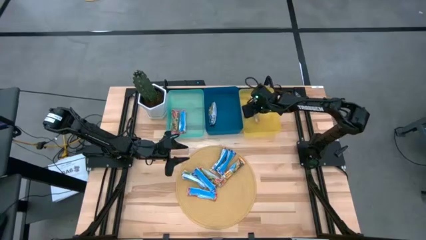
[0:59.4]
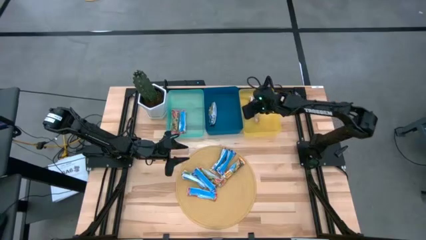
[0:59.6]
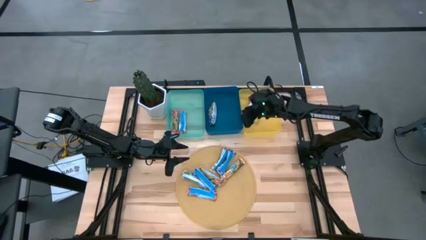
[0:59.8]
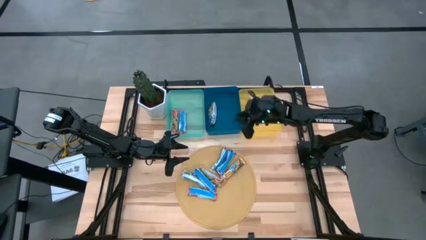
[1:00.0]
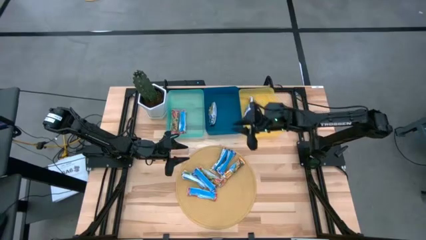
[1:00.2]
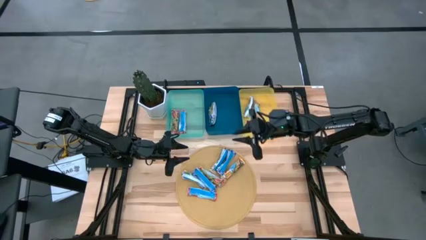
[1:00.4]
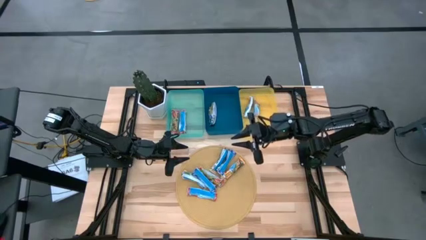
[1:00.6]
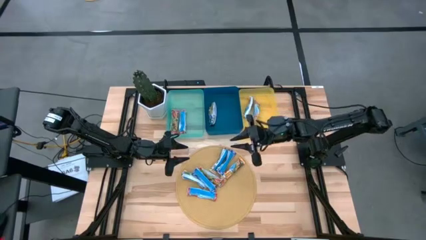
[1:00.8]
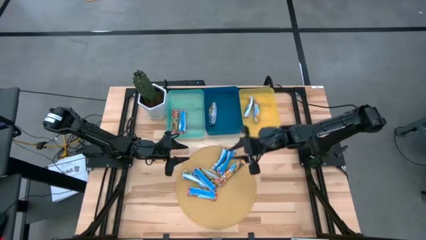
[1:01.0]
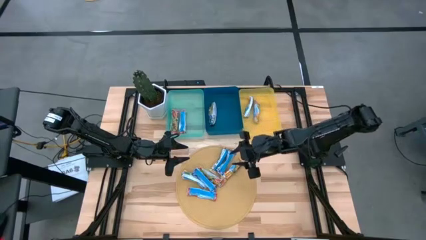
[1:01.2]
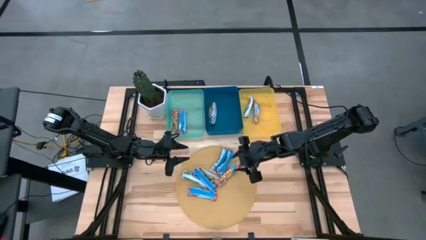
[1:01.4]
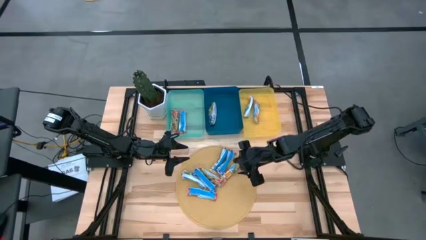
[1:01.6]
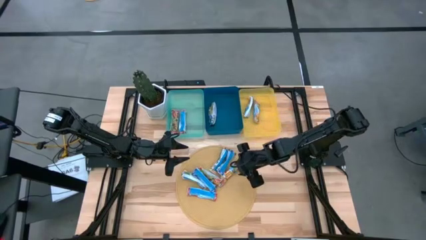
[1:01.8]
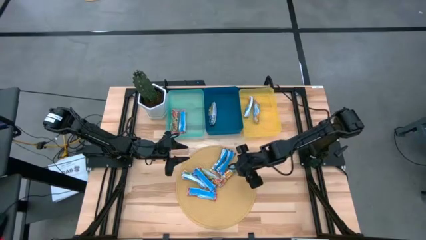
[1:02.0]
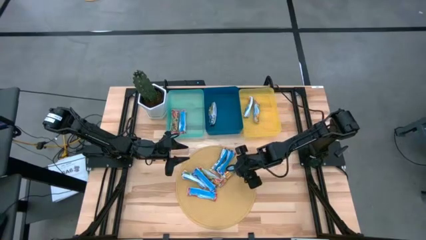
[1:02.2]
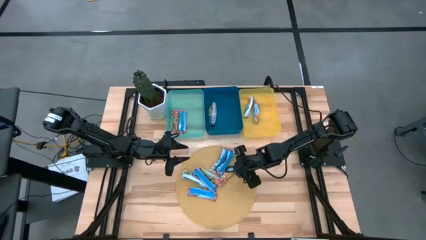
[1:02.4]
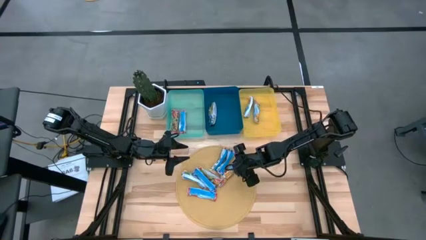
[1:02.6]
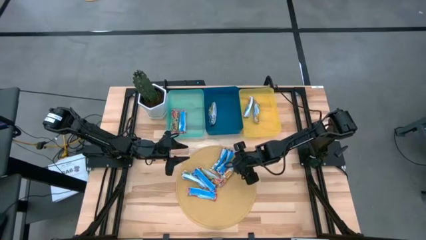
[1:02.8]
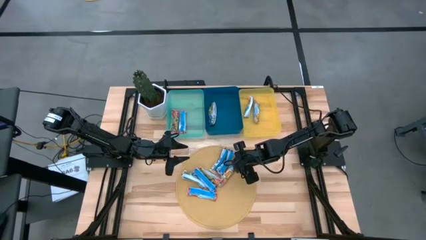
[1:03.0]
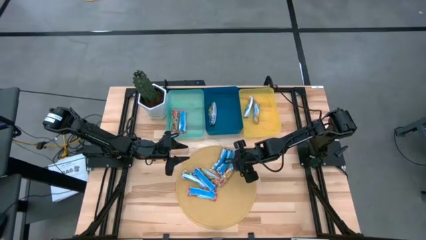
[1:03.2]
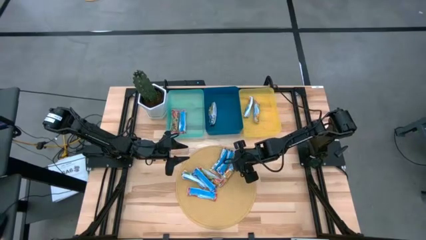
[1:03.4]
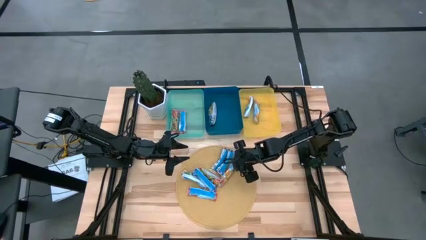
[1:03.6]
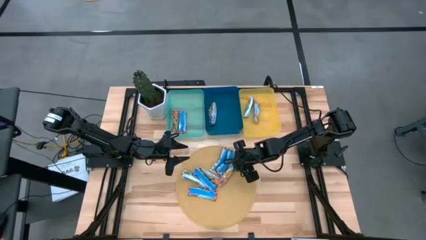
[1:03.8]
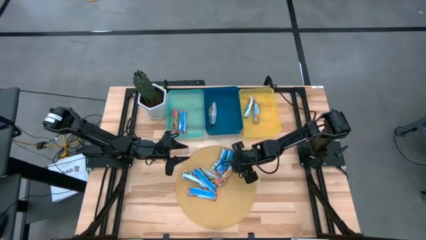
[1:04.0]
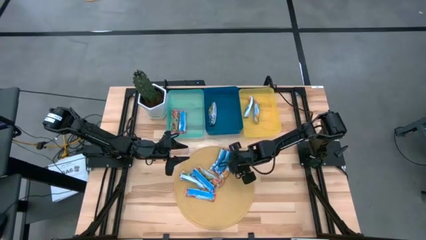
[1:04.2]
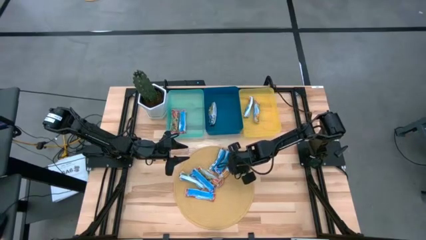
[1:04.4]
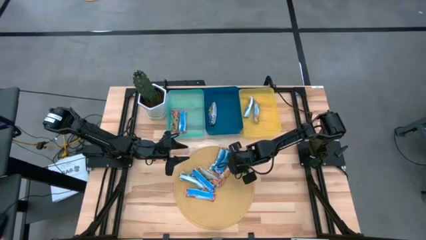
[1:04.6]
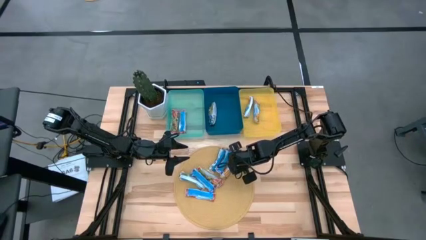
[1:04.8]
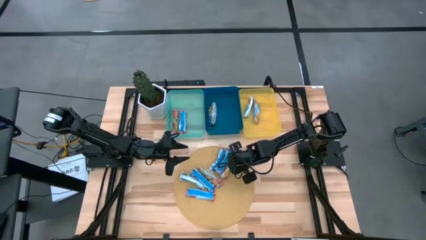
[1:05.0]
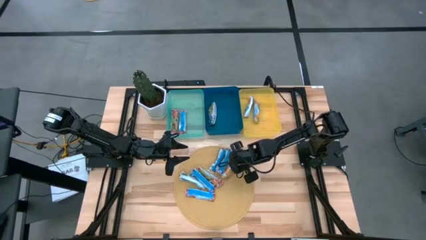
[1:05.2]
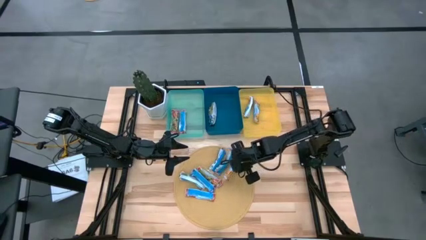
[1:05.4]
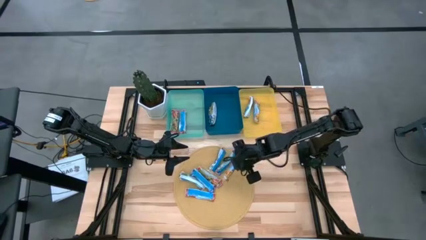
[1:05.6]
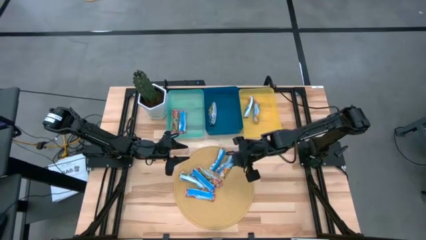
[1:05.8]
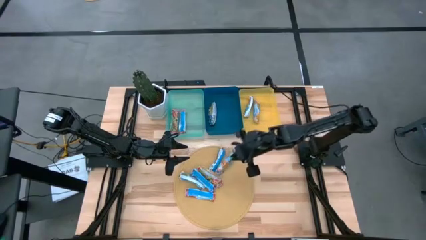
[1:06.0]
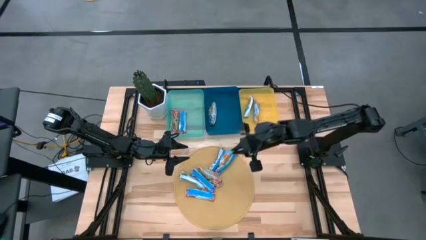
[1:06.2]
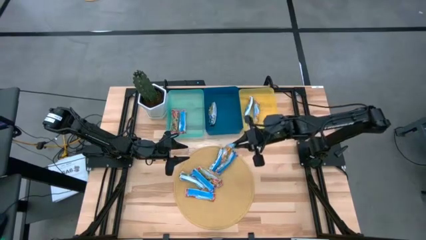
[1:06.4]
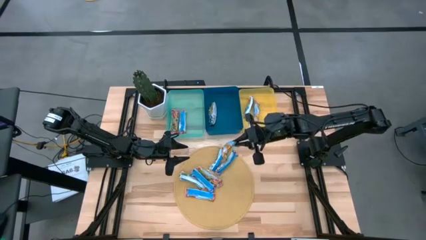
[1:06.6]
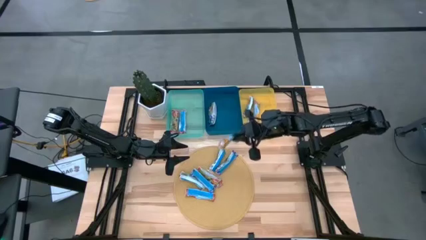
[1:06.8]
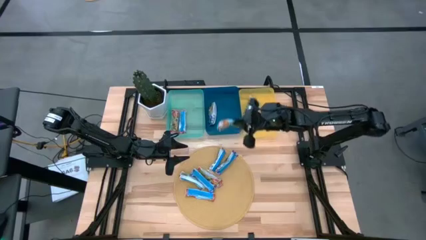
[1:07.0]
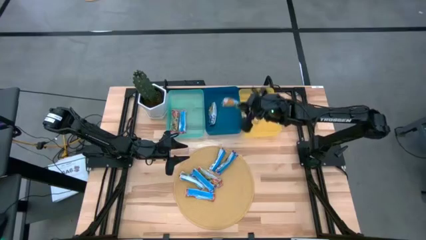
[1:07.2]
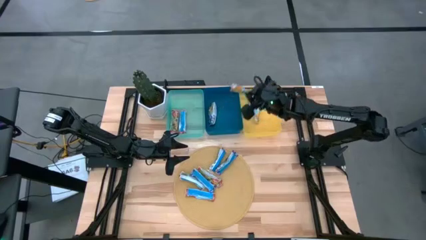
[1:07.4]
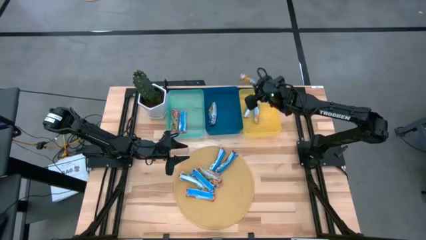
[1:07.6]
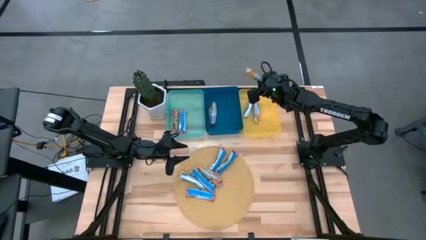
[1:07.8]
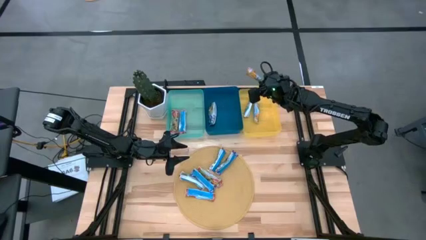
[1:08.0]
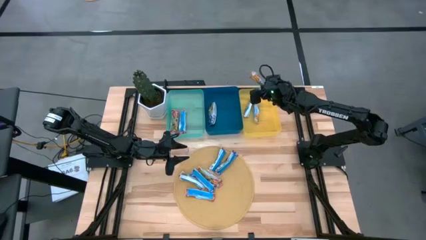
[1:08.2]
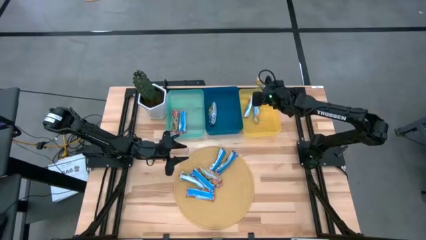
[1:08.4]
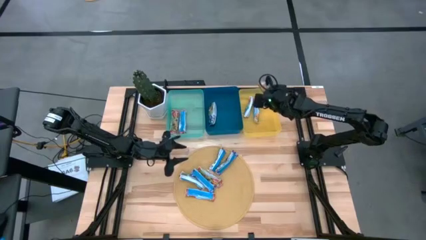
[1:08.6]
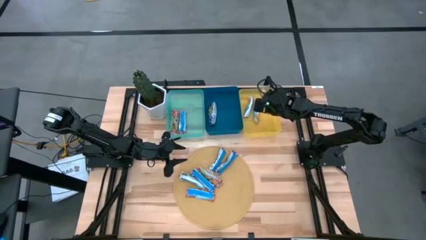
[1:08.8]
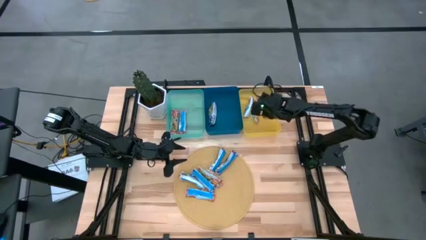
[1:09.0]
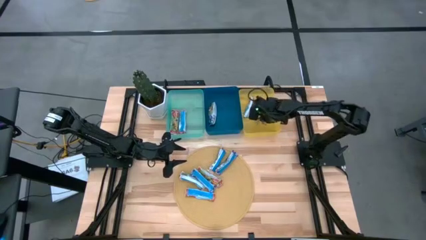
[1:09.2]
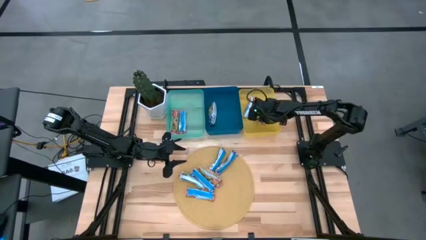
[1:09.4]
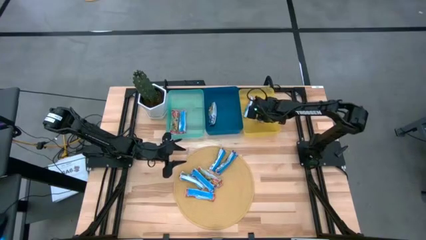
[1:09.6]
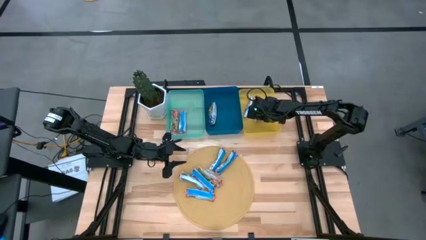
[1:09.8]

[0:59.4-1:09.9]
Task: Pick and place Granola Bars by type
Put the yellow granola bar into the yellow bin

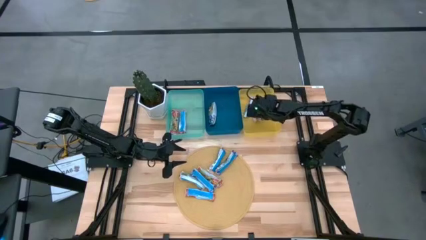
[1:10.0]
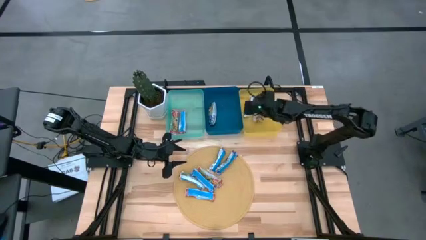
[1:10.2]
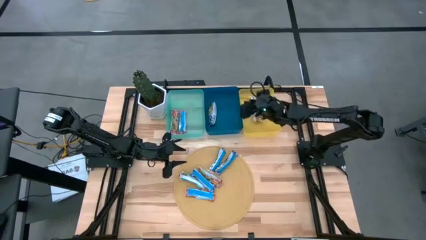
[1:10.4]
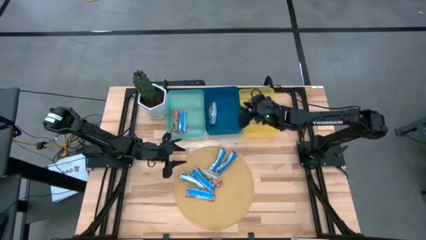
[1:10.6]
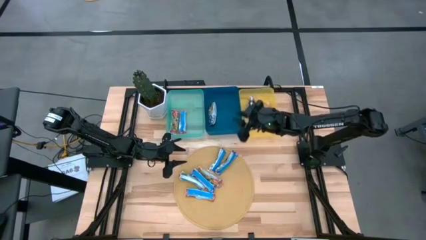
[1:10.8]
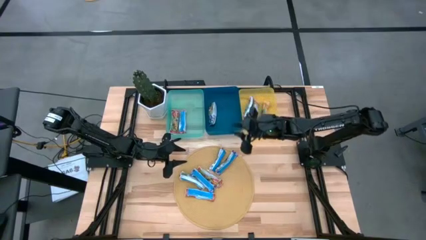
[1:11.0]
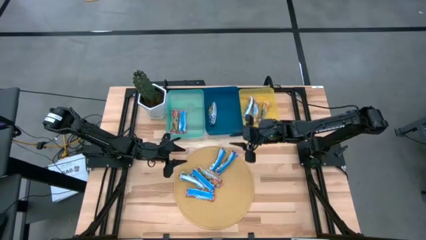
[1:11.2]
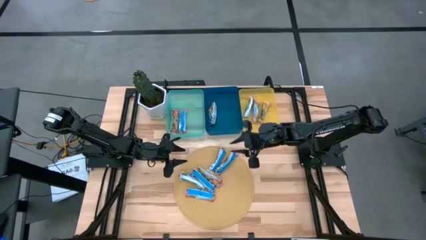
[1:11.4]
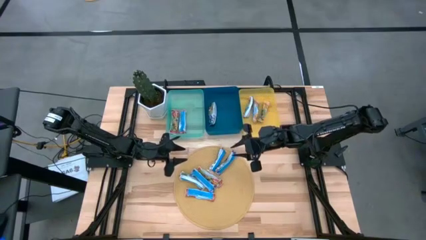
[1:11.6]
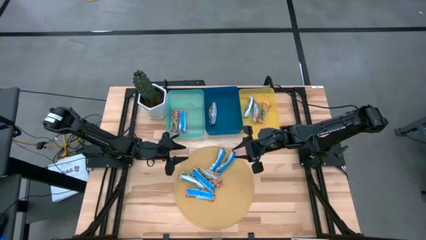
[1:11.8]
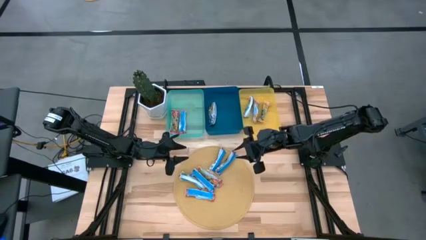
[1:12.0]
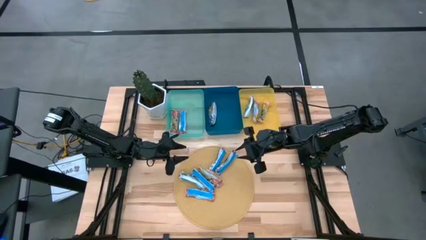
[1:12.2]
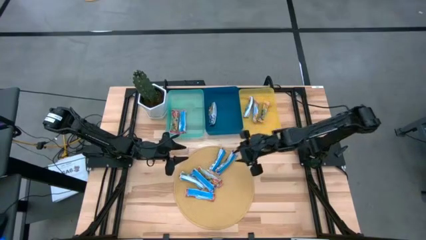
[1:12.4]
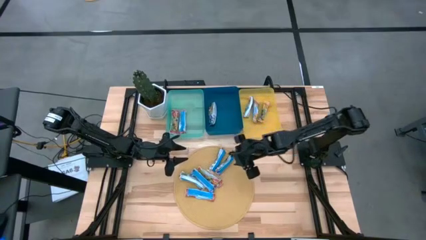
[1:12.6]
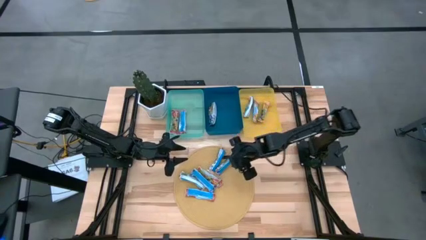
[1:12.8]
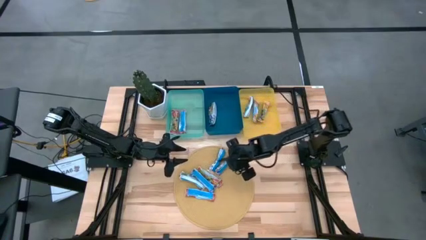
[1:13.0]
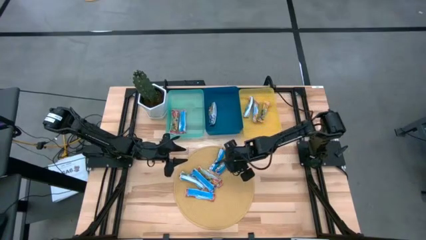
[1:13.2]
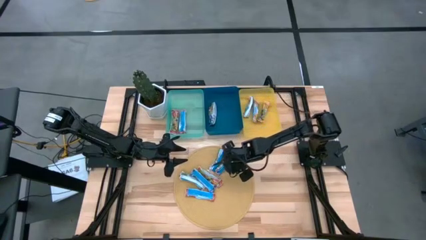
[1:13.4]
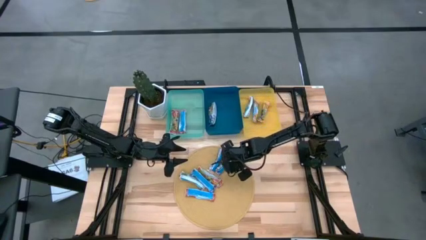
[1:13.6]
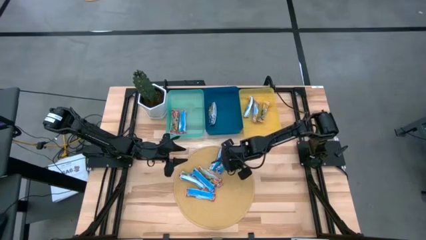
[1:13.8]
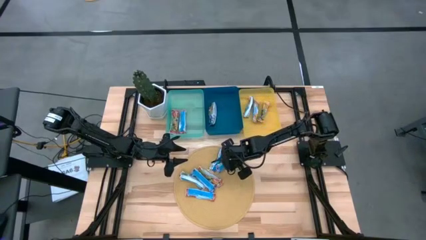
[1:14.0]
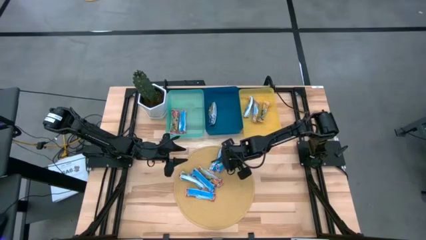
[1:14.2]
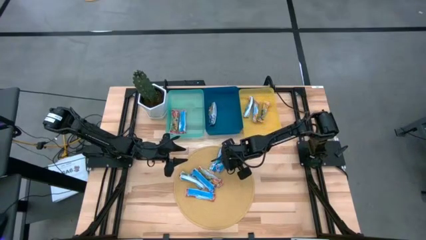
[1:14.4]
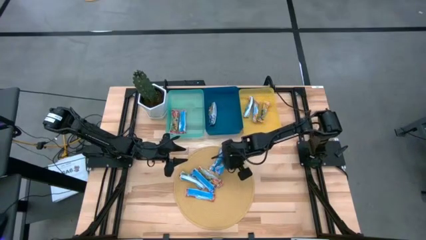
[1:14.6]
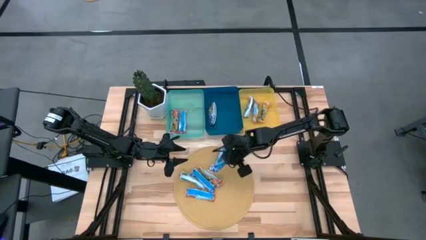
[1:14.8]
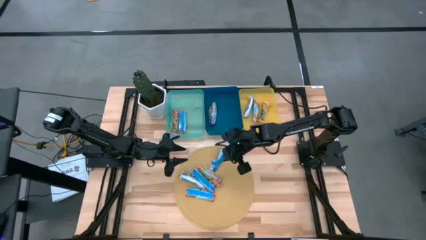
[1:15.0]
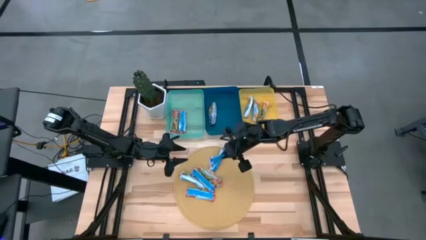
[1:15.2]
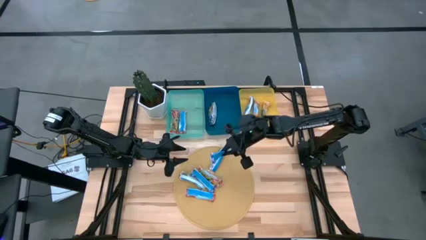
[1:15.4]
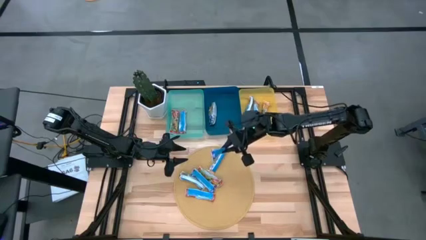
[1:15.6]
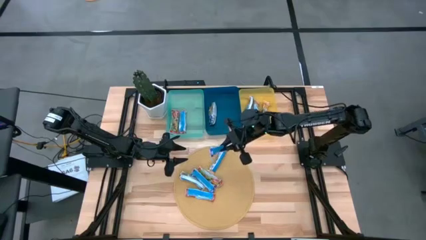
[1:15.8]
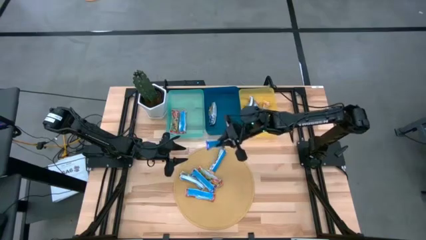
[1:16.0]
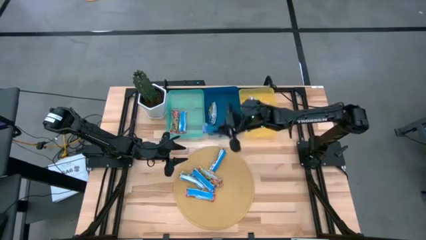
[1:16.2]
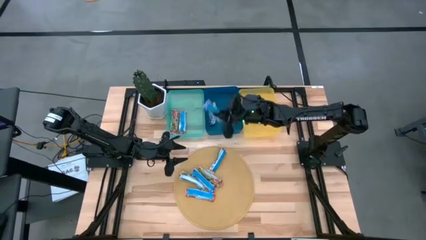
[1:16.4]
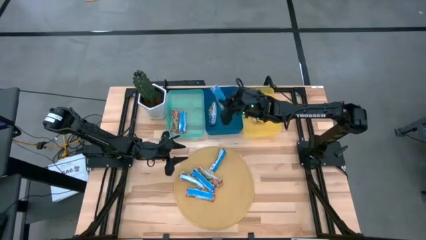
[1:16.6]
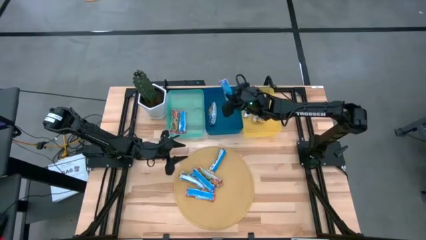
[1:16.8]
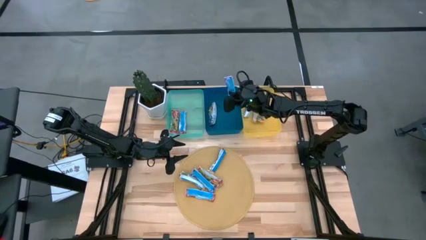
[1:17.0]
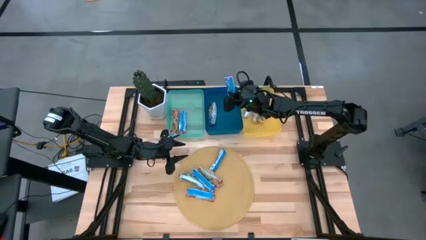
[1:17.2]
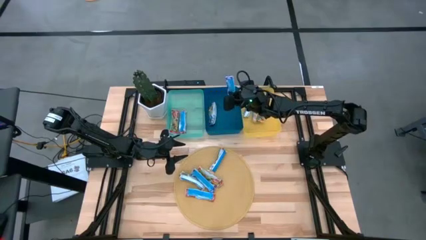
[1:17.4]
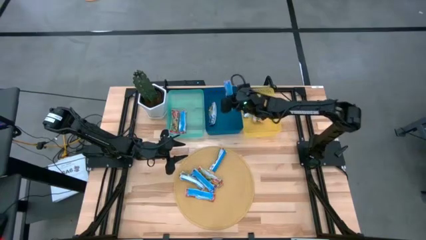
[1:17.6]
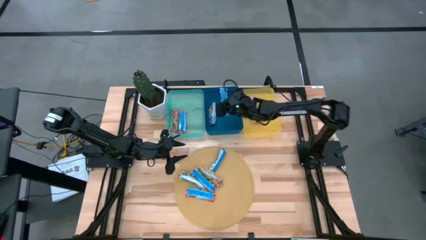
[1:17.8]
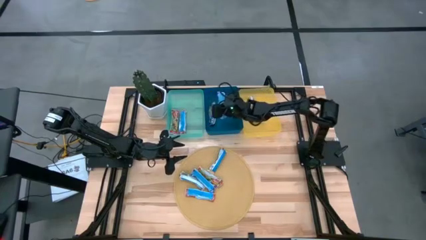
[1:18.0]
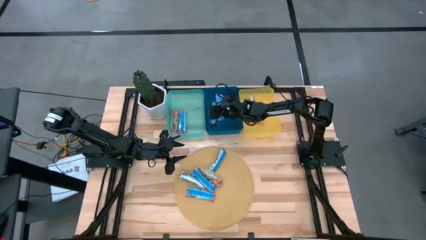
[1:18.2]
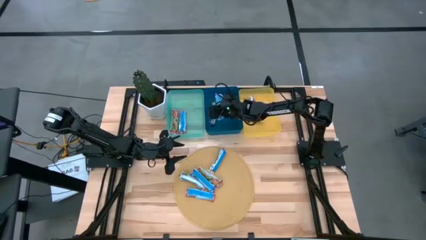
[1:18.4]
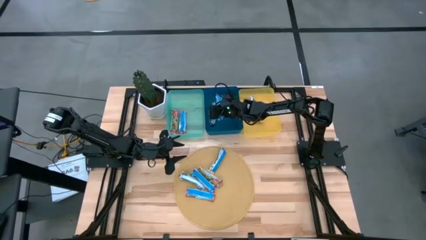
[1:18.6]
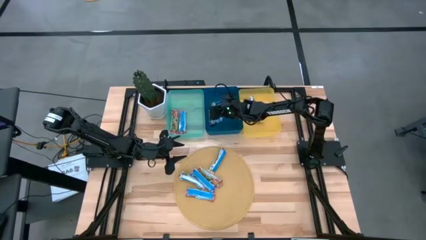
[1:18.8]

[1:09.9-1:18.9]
Put the blue granola bar into the blue bin
